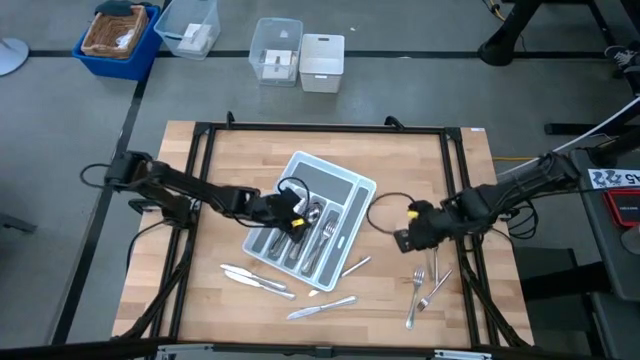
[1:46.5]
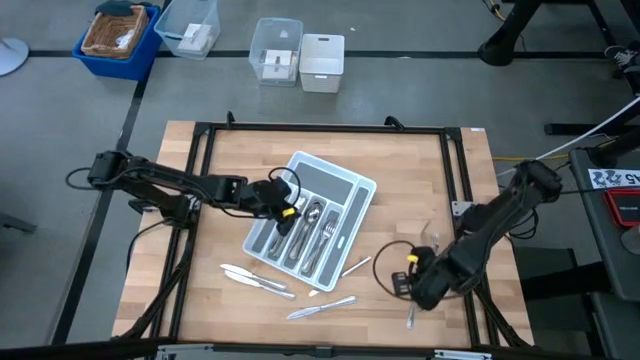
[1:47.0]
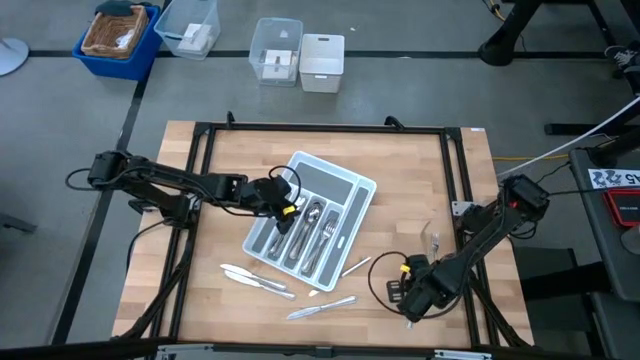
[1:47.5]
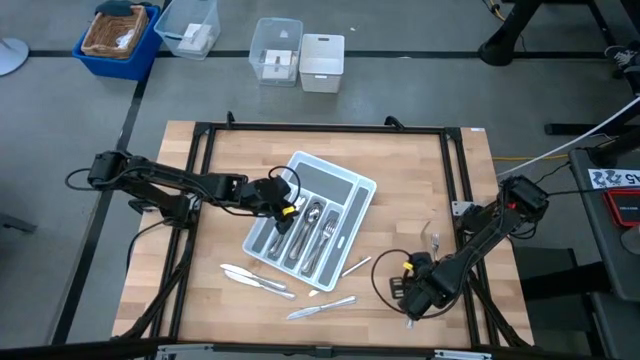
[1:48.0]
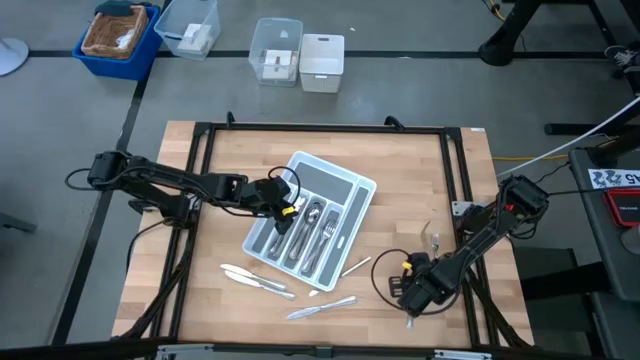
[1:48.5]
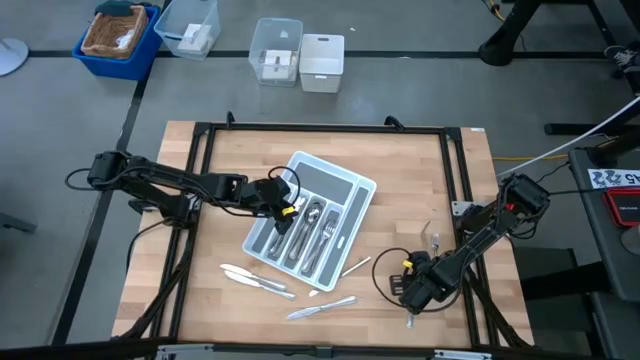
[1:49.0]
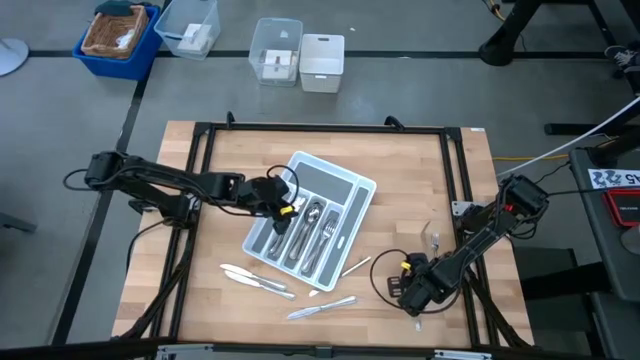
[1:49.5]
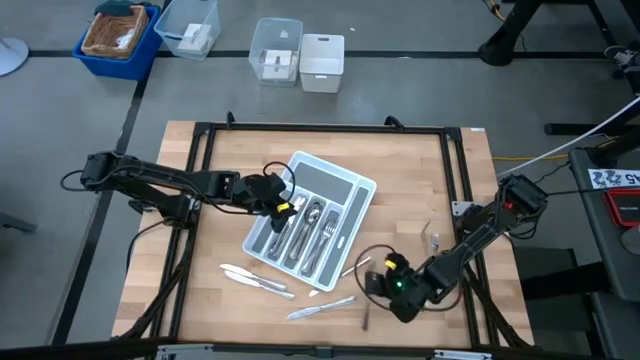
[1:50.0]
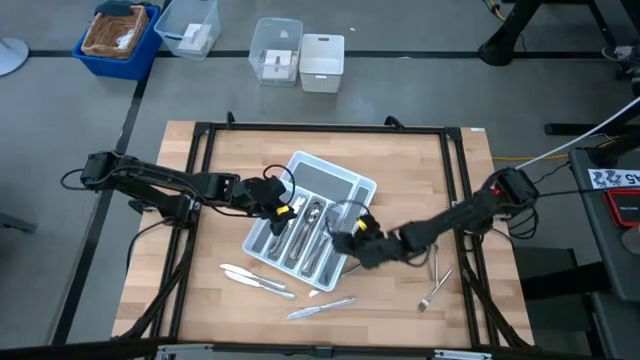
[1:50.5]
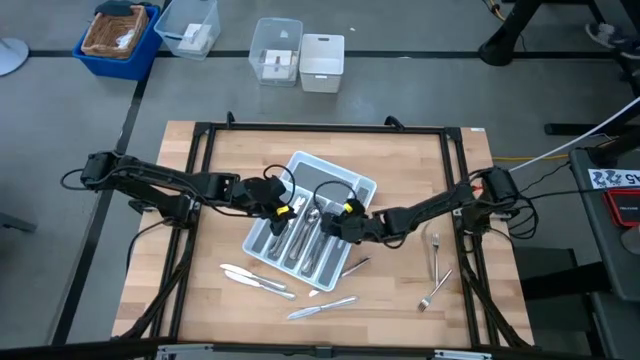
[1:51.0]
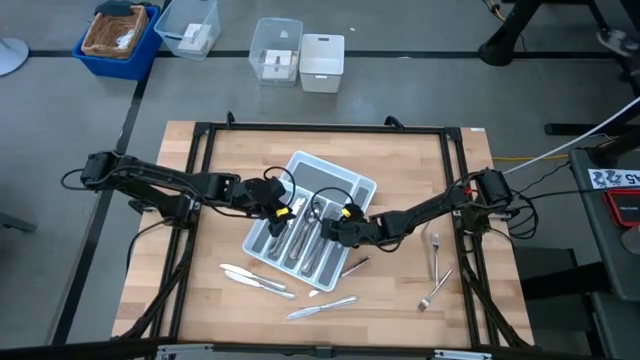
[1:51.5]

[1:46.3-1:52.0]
Task: Sort silverware
Put the silver fork into the white cutlery tray

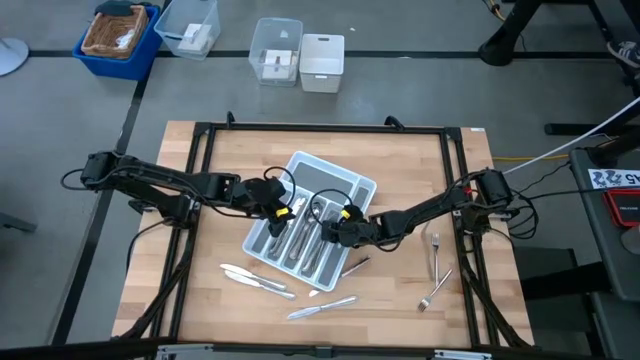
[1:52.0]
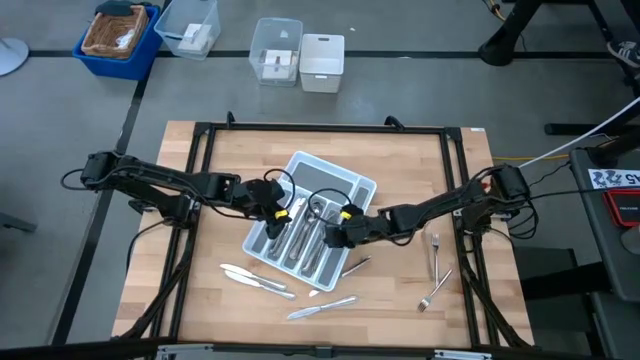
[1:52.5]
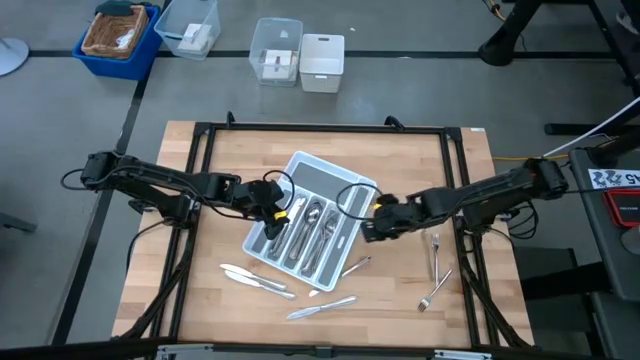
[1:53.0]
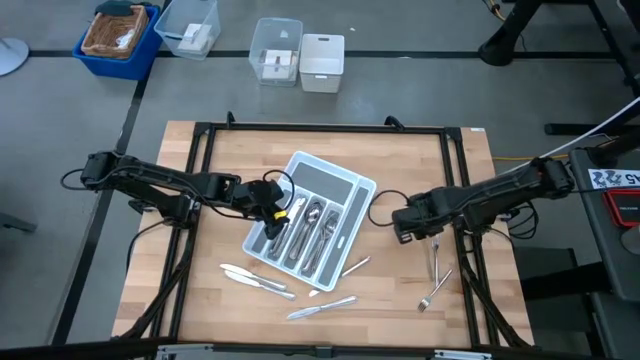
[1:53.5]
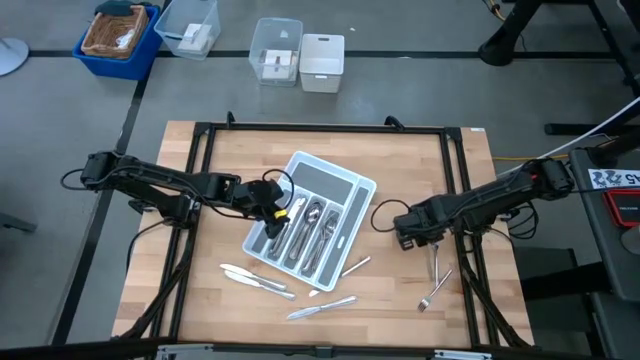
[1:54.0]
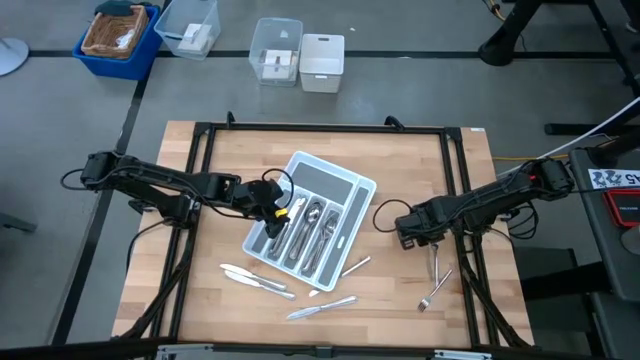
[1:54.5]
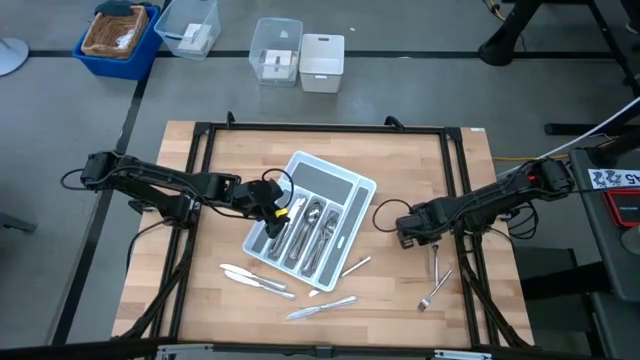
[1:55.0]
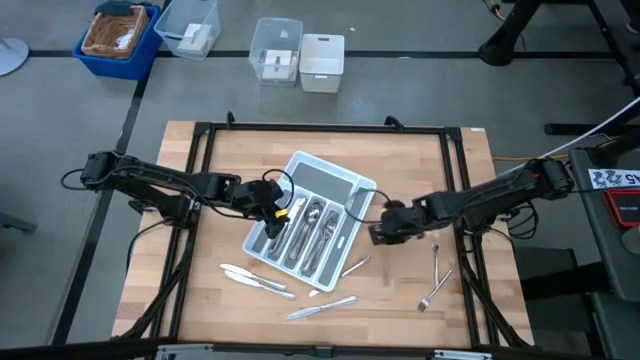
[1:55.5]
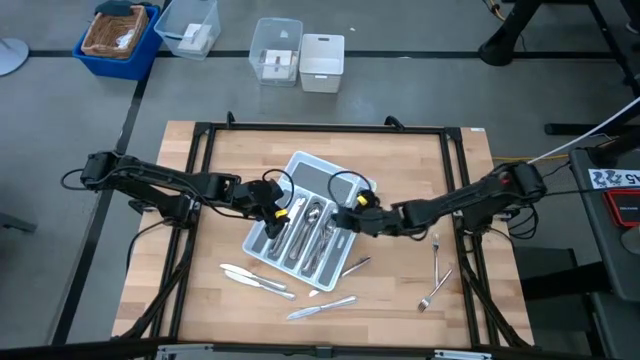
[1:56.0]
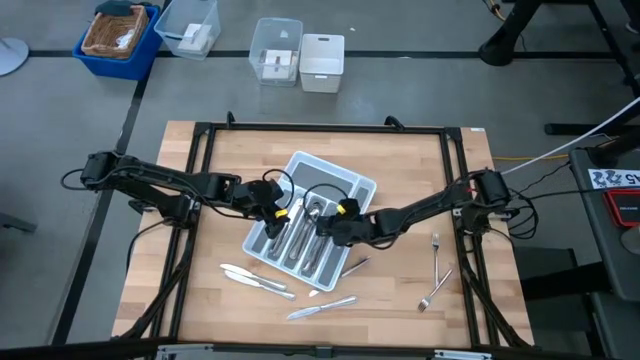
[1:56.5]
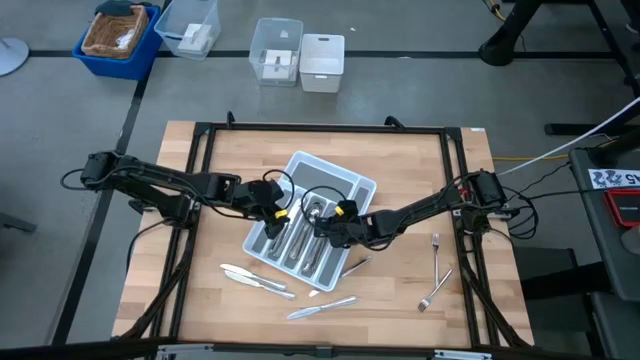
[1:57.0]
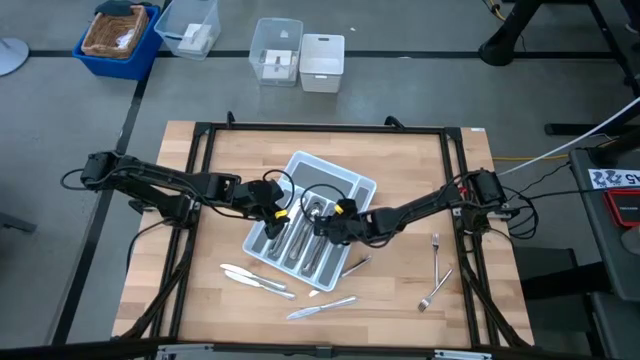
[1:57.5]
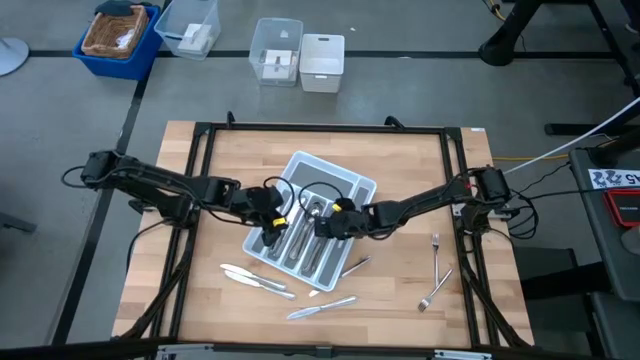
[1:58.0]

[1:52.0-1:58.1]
Put the silver fork into the white cutlery tray

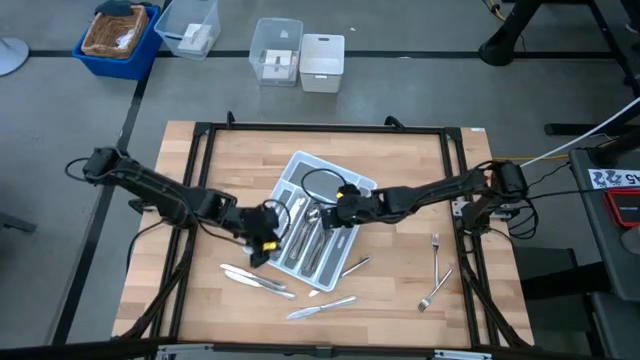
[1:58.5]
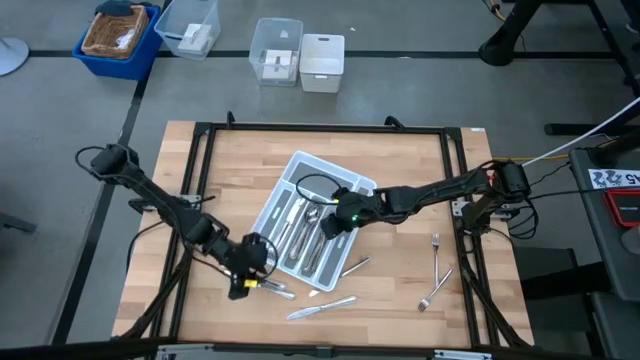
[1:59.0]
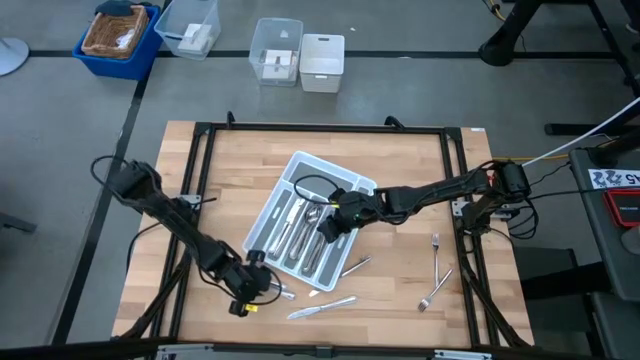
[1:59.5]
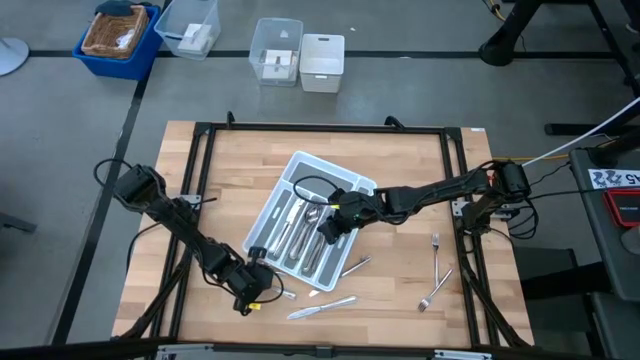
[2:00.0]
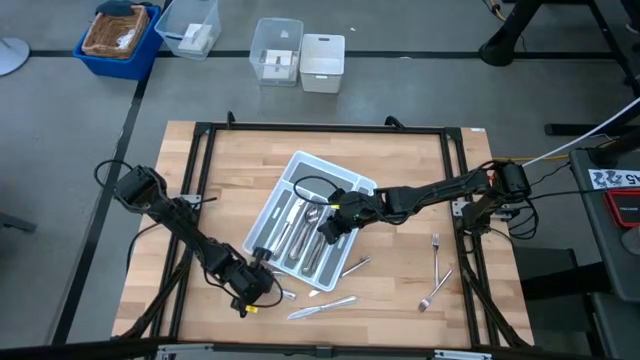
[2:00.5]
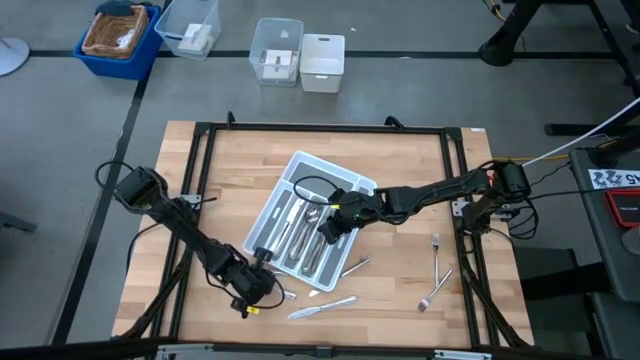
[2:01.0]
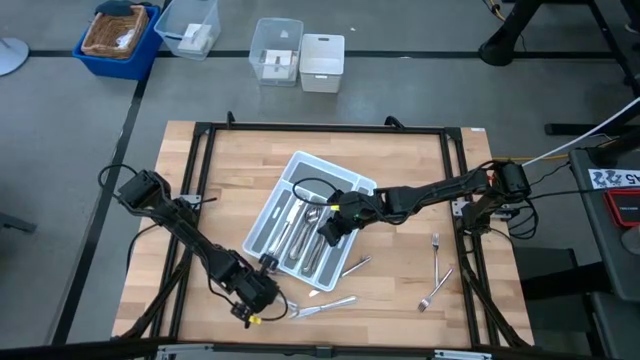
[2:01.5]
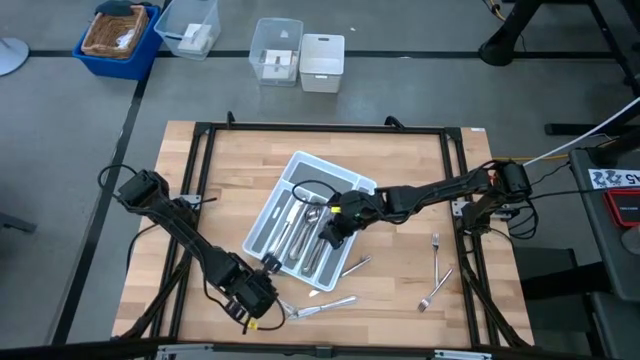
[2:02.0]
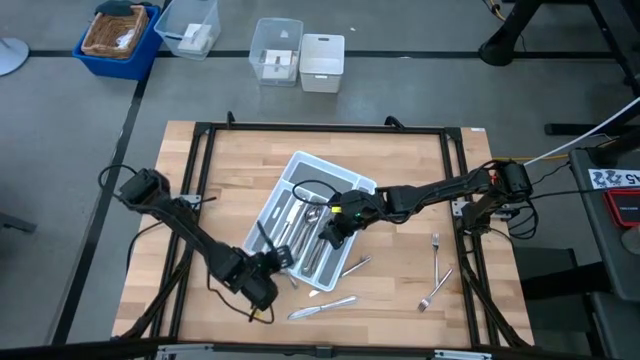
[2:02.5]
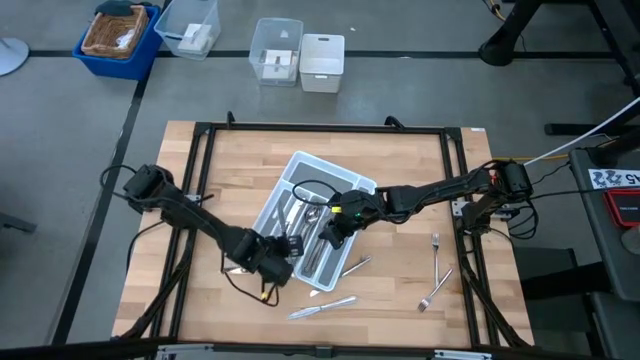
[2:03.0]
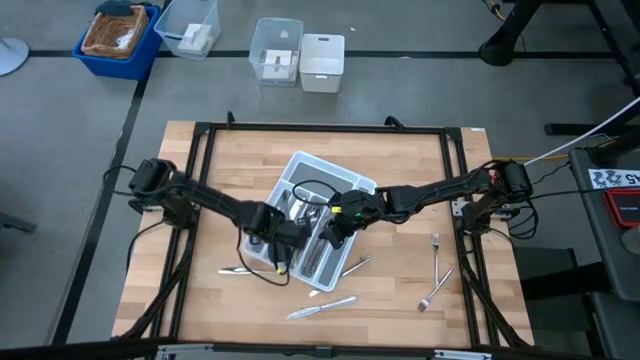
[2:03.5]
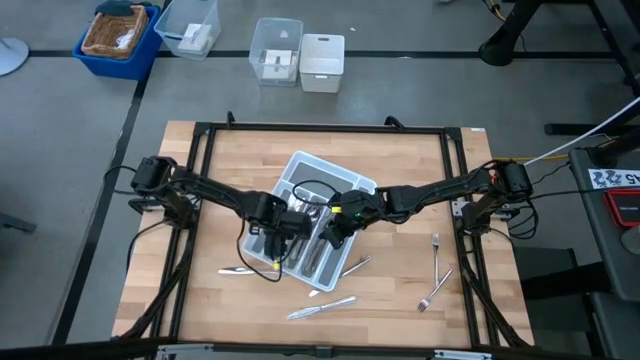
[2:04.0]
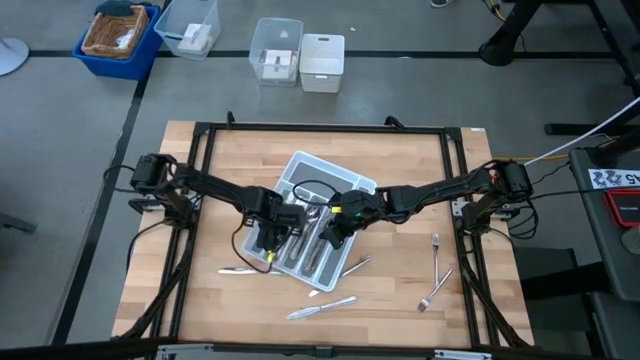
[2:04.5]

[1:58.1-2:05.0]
Put the silver knife into the white cutlery tray

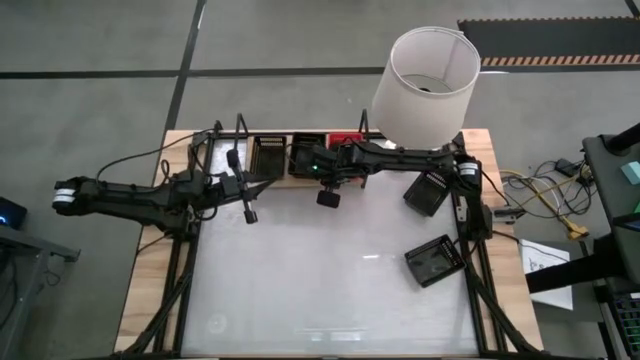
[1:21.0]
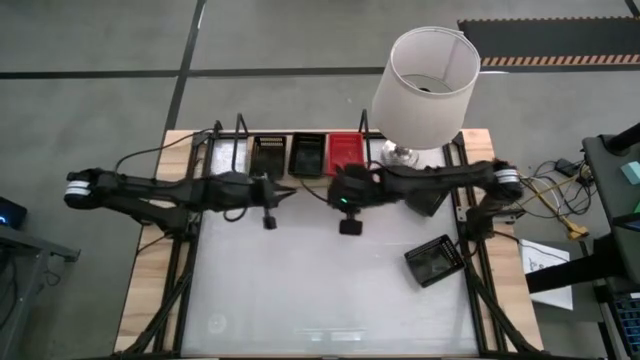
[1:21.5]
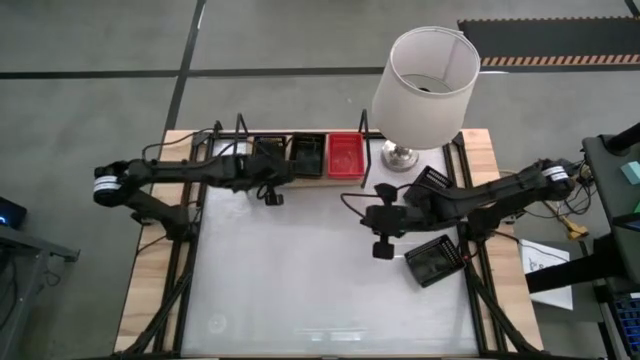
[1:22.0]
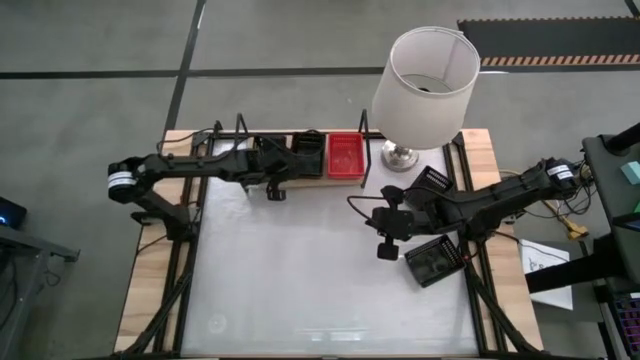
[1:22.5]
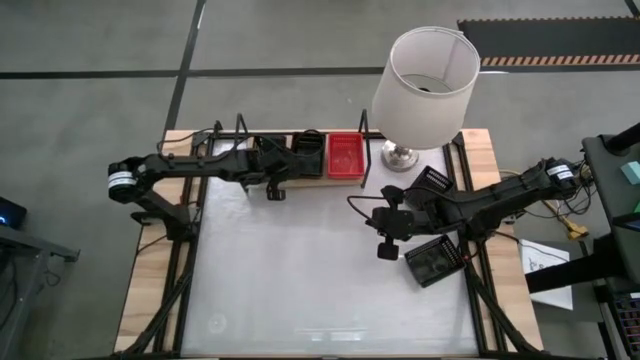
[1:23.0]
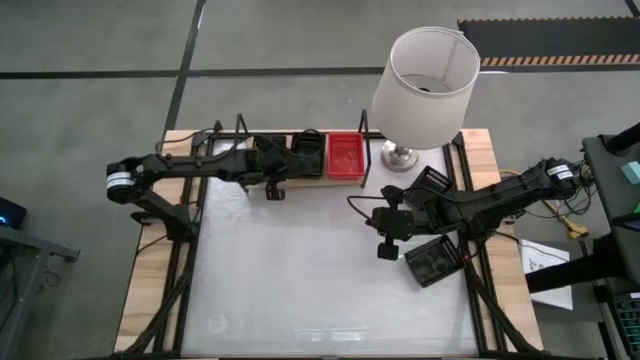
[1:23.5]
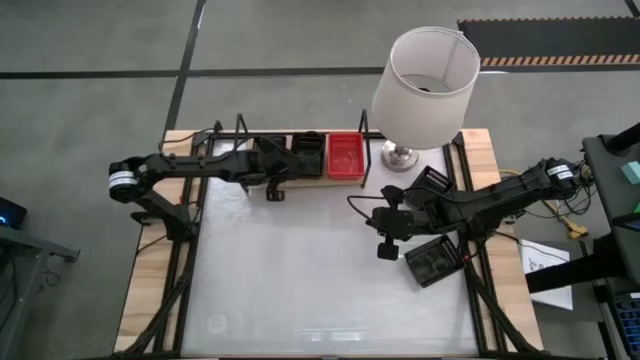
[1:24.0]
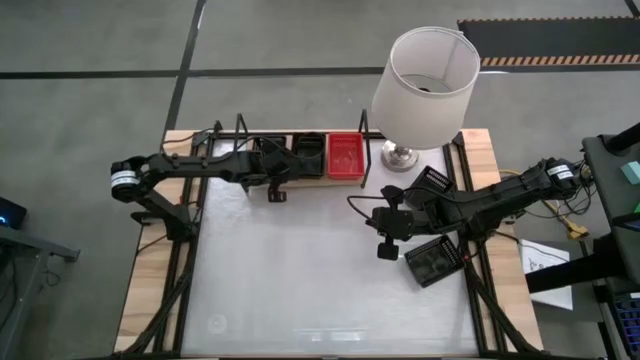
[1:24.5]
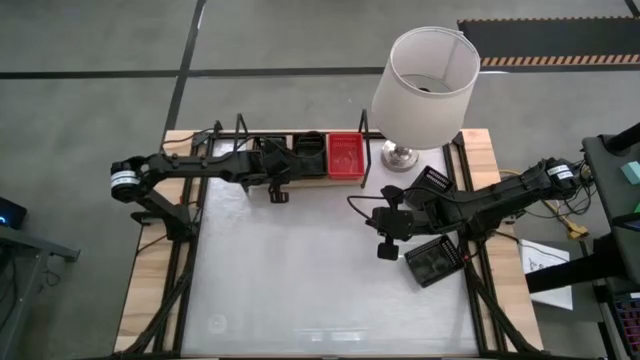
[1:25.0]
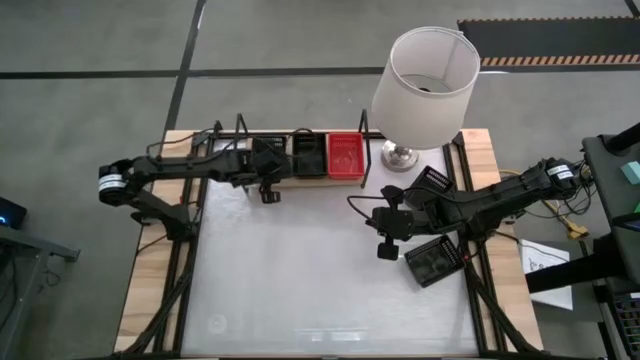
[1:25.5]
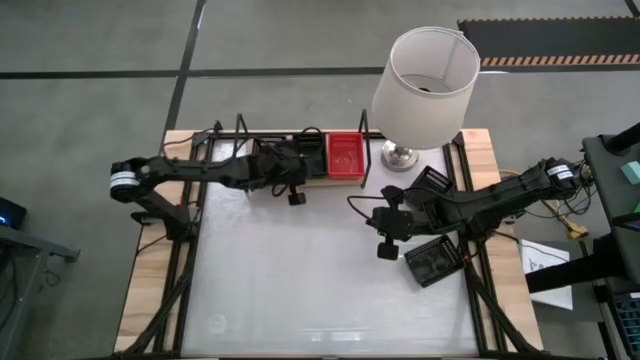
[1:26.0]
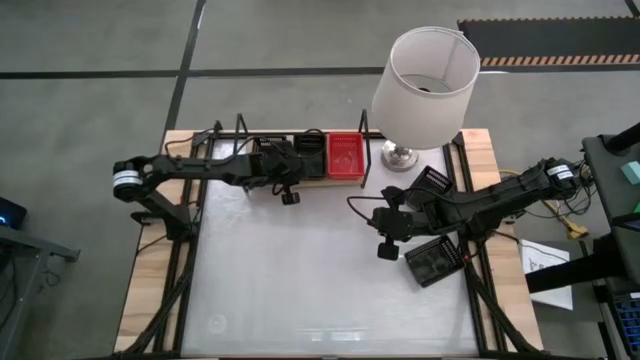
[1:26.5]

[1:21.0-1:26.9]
Task: Stack baskets on shelf by color
Adjust the right black bins on the shelf
